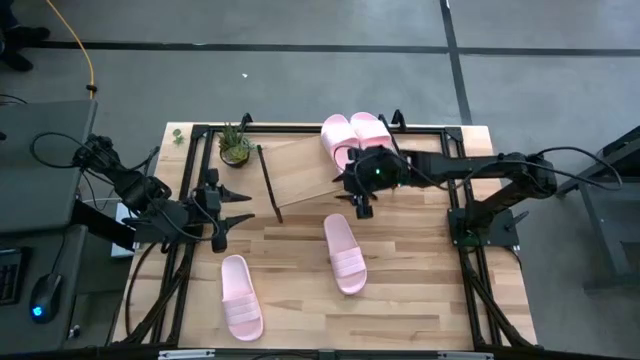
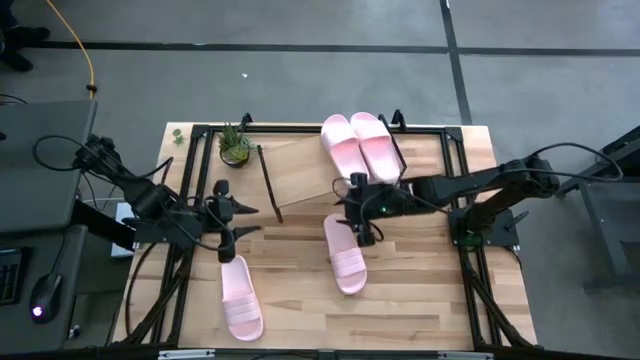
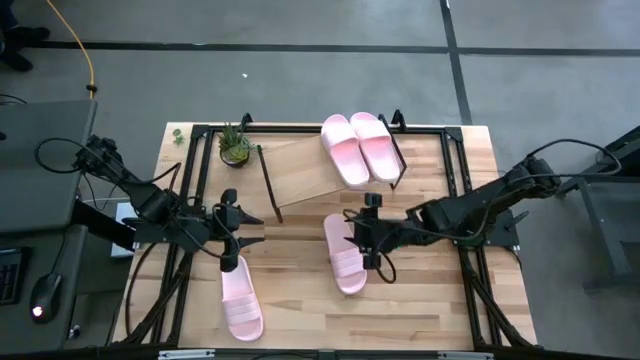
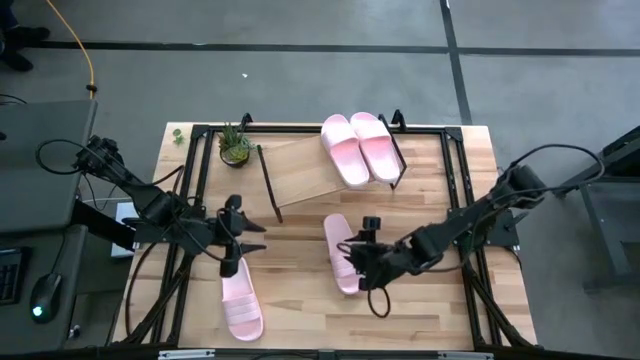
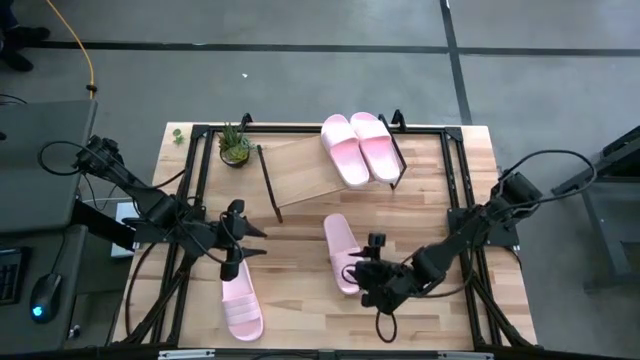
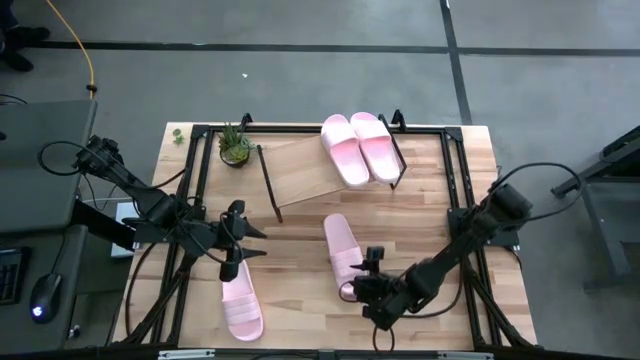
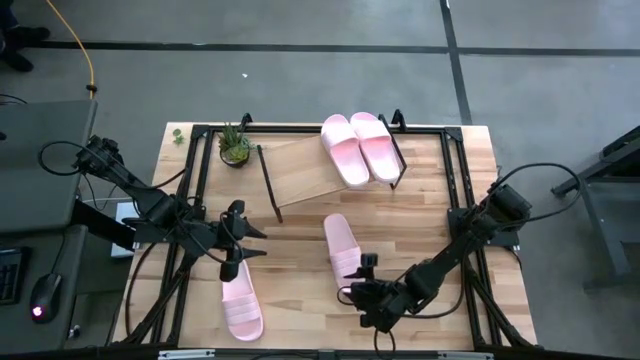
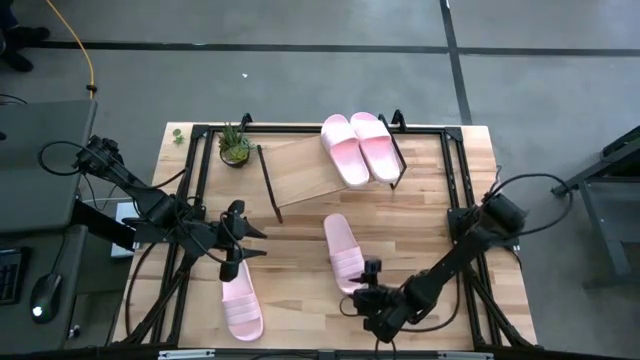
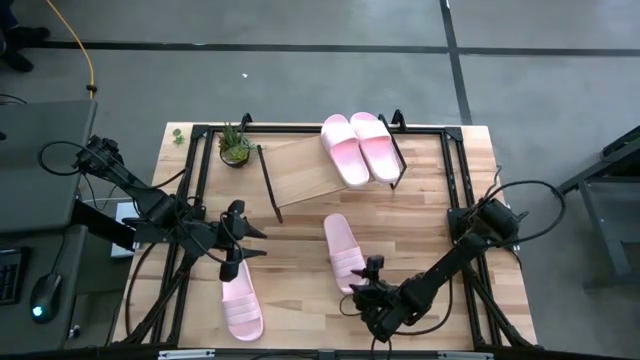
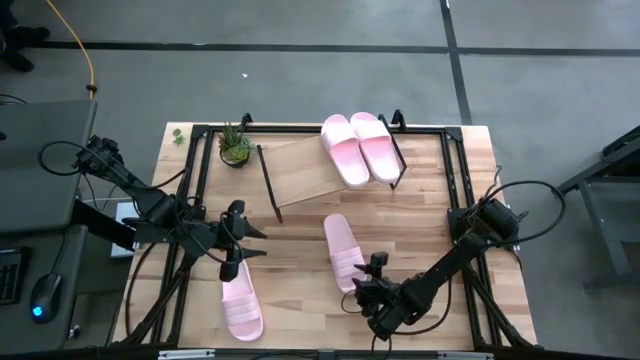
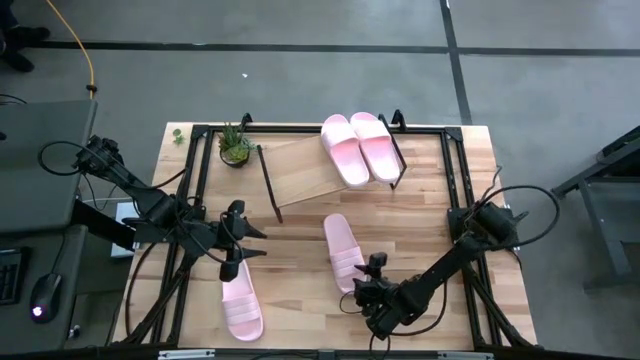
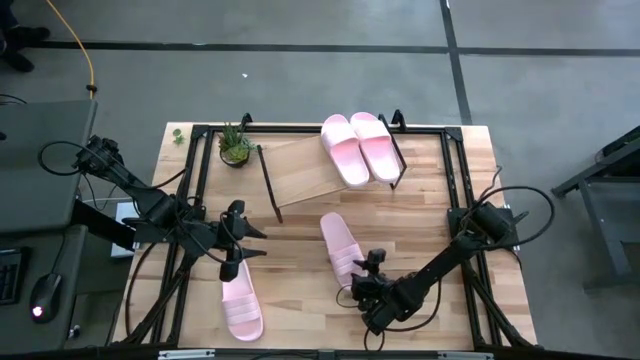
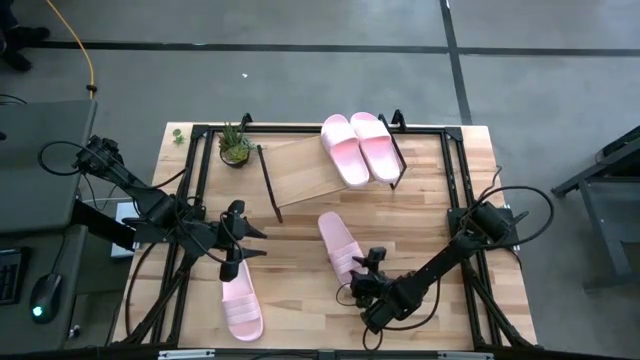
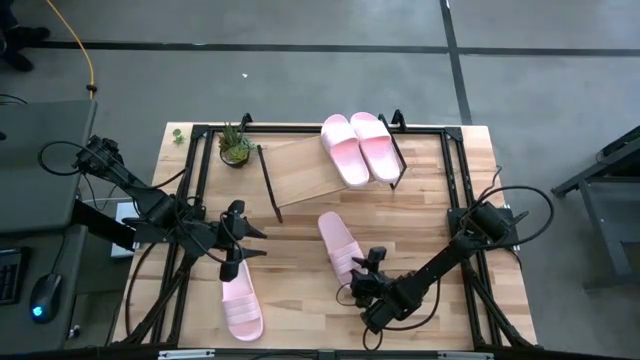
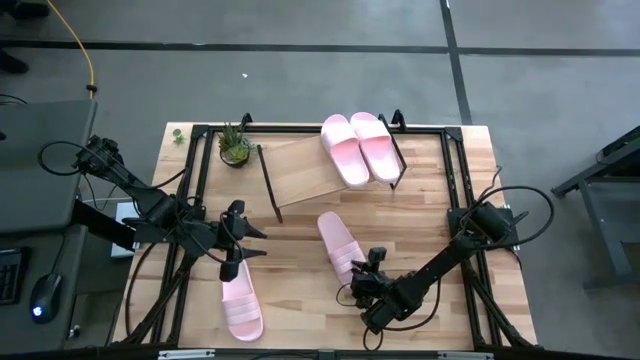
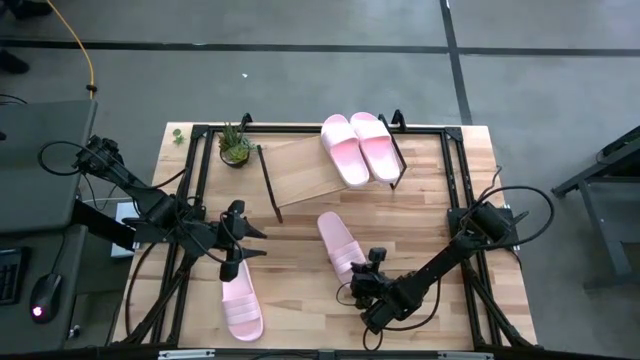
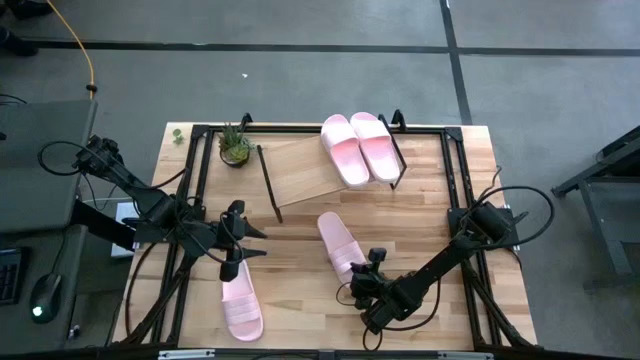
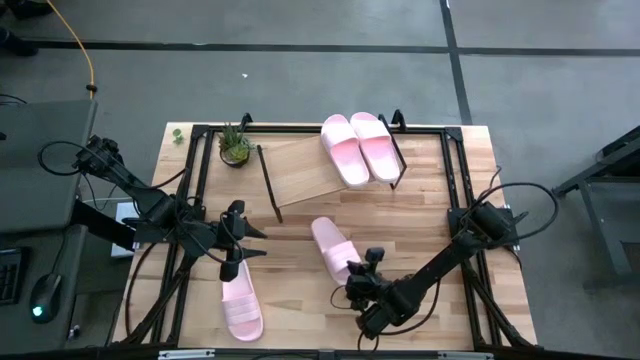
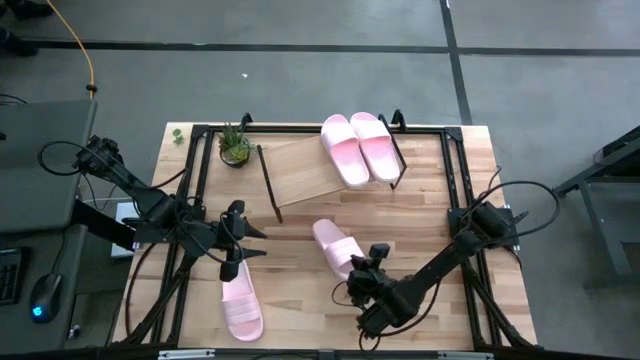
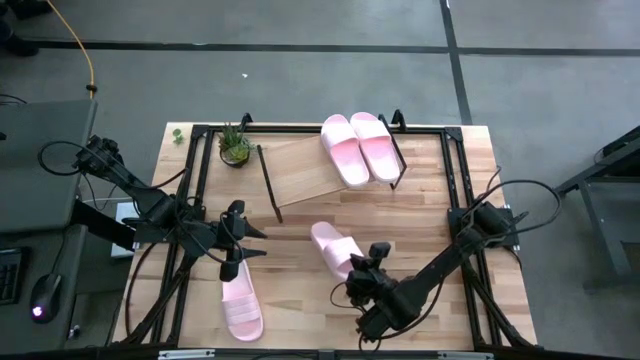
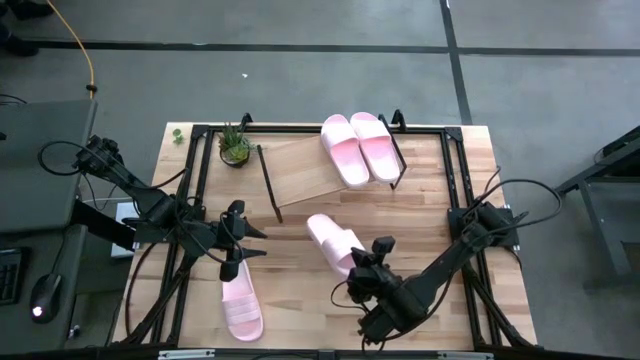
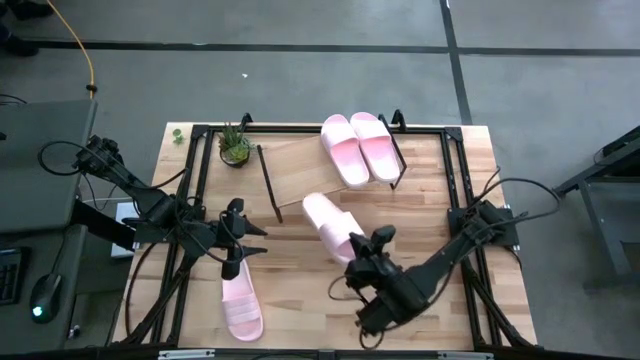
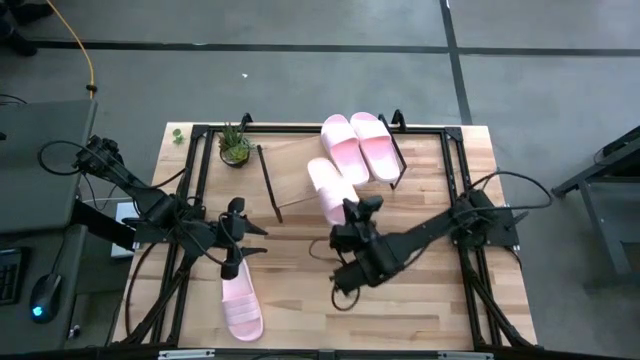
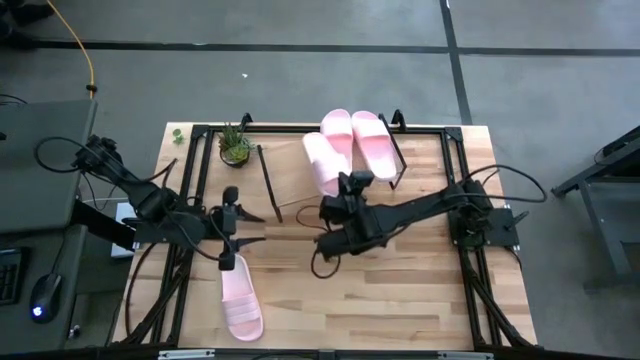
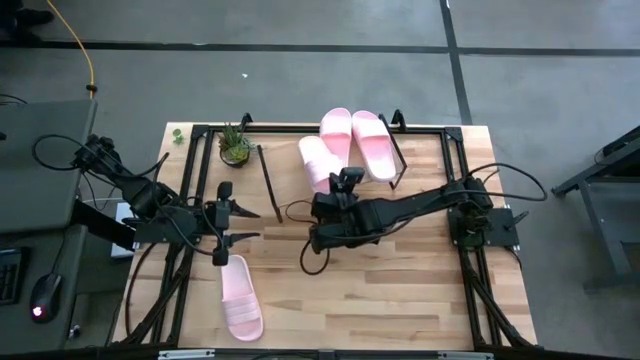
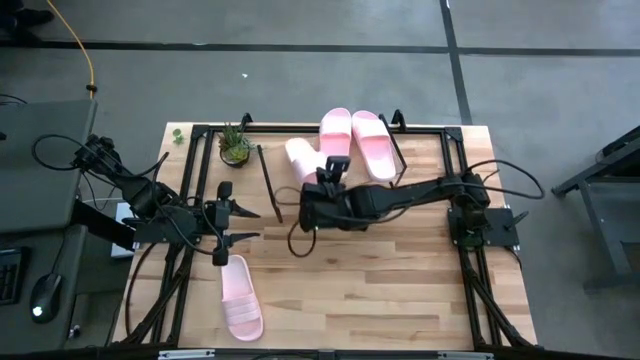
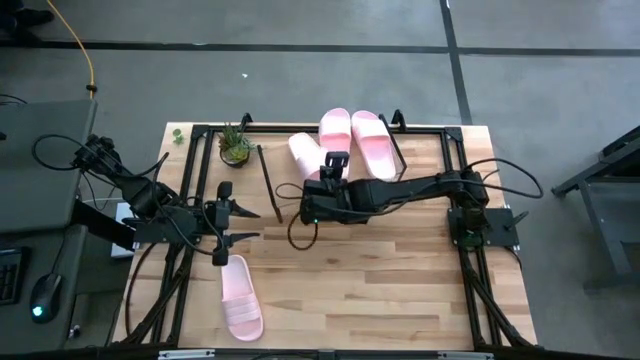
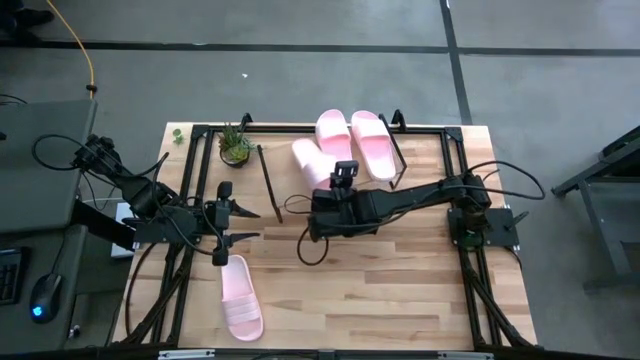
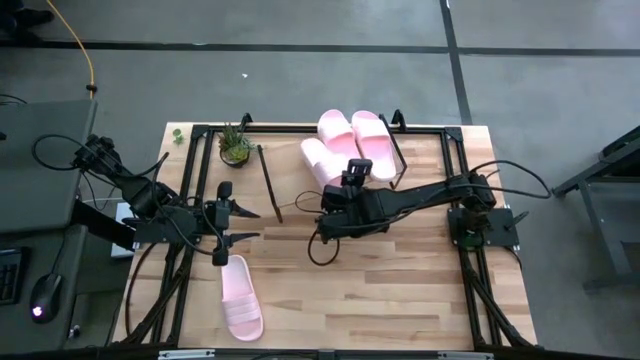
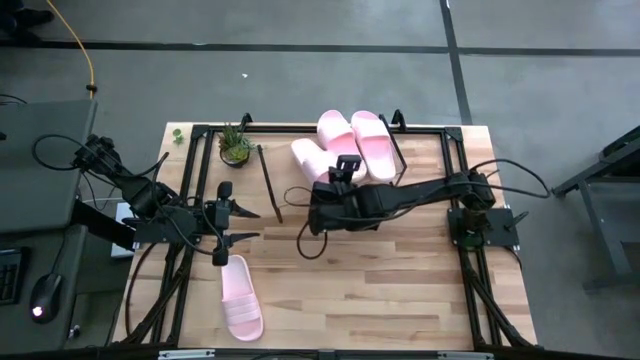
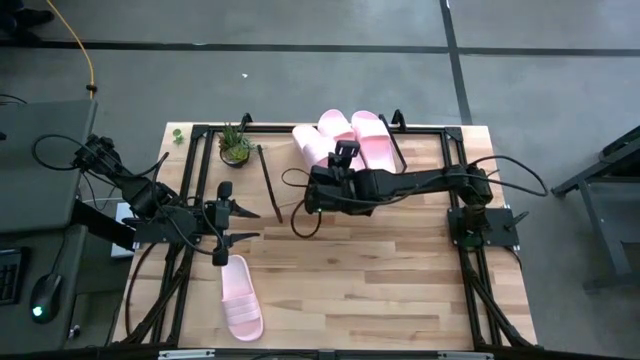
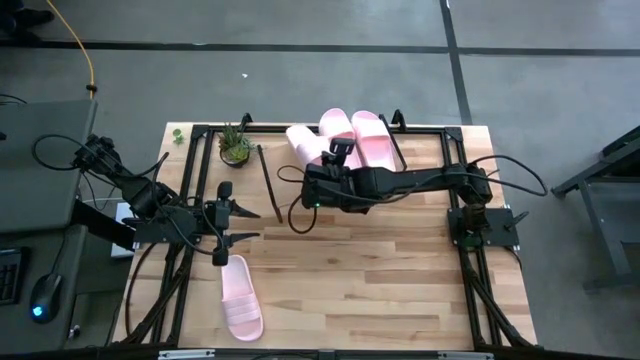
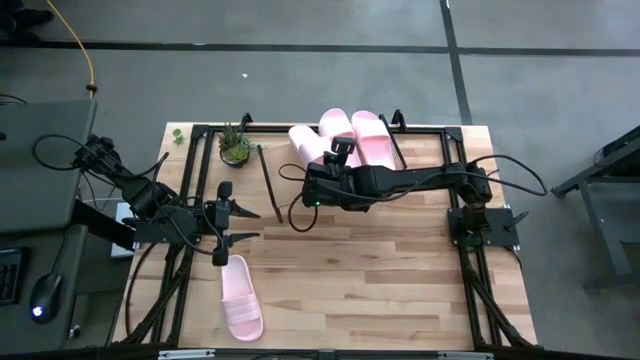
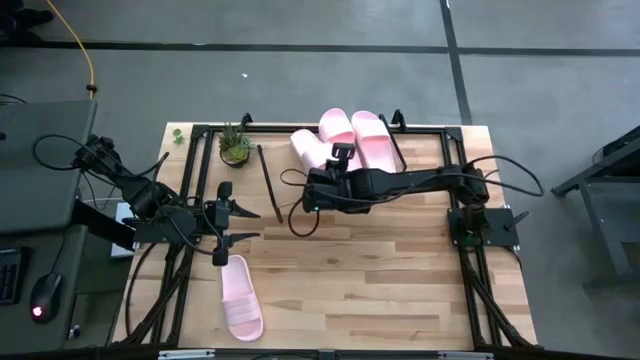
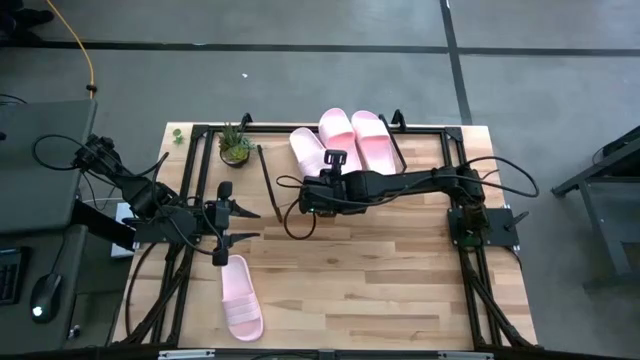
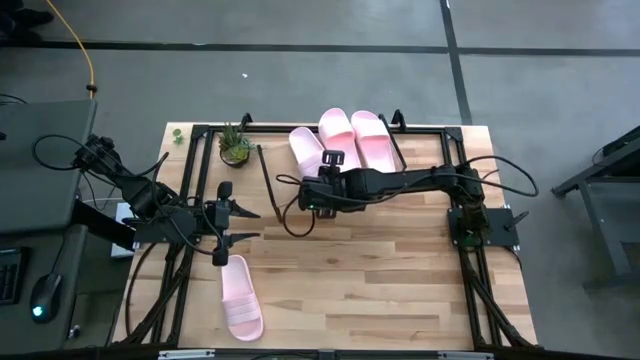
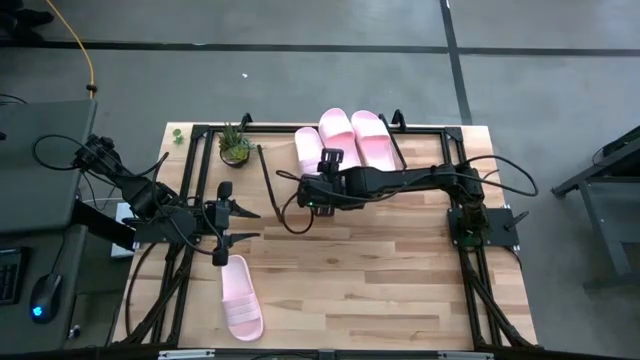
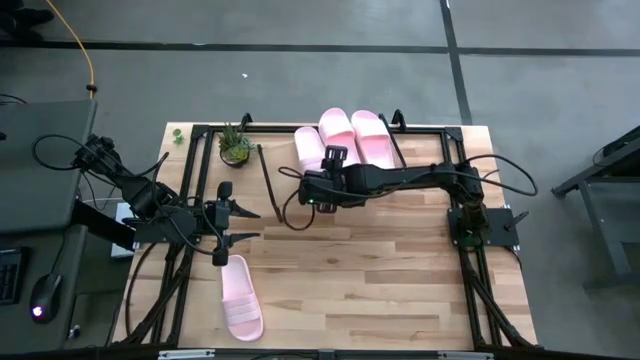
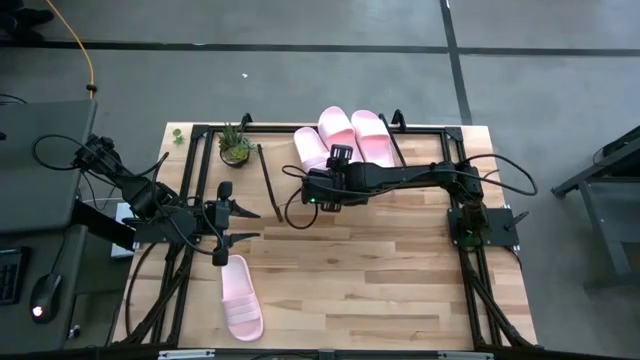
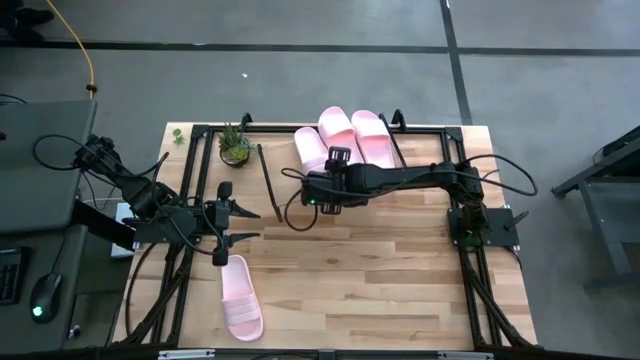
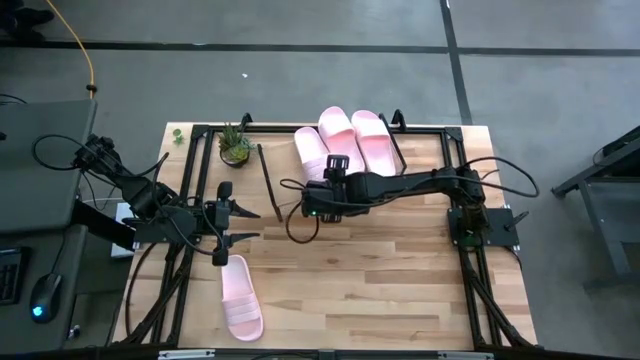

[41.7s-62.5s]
Task: Pick and place slides into the shelf
Put the right pink slide on the shelf

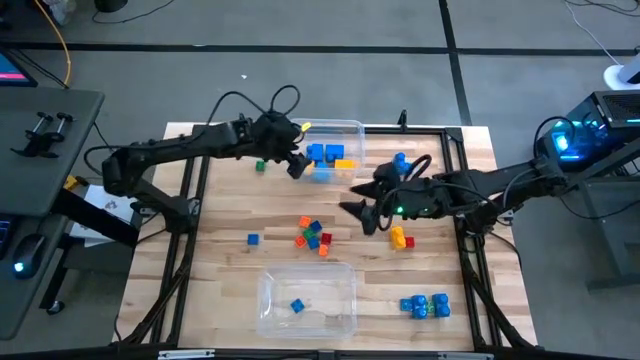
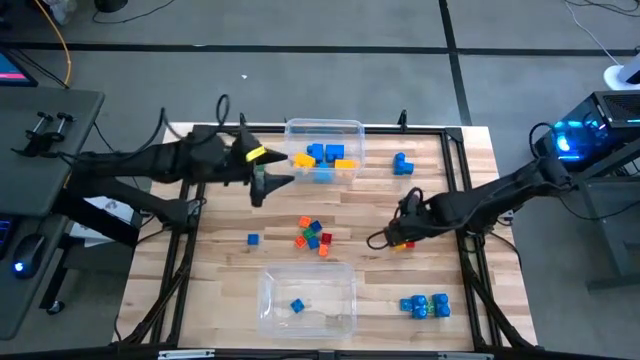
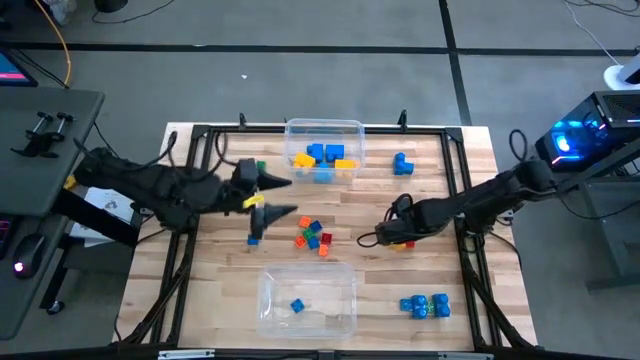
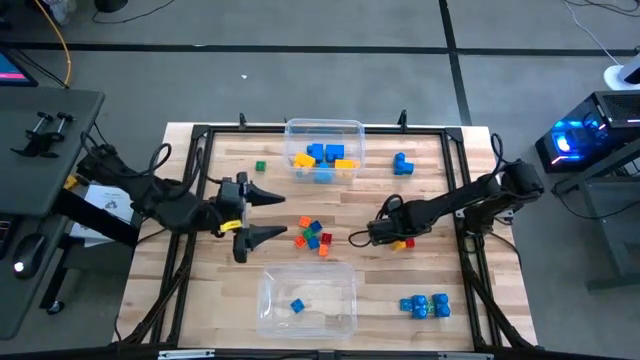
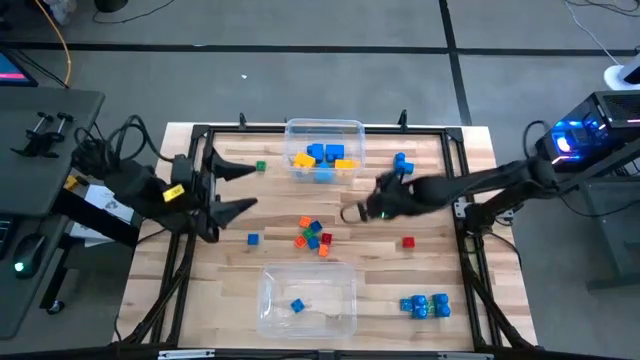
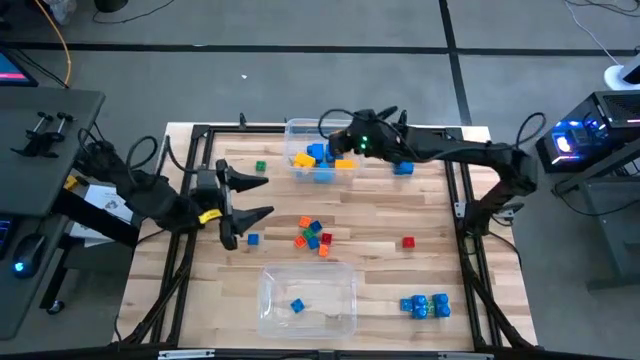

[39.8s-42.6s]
Task: Sort blocks by size
Put the large yellow game piece into the top transparent bin
